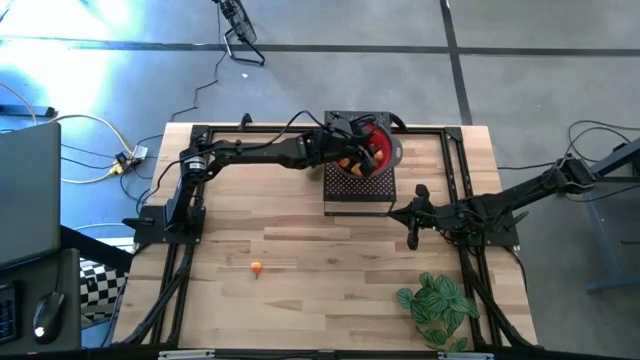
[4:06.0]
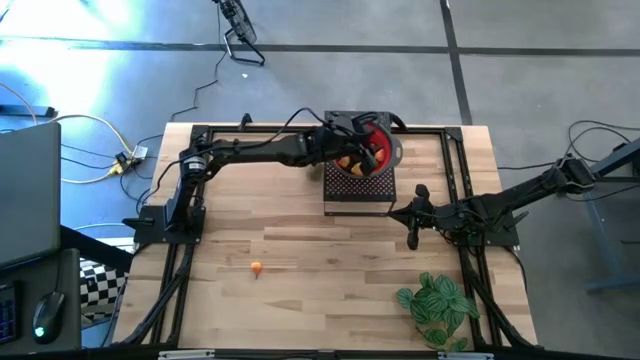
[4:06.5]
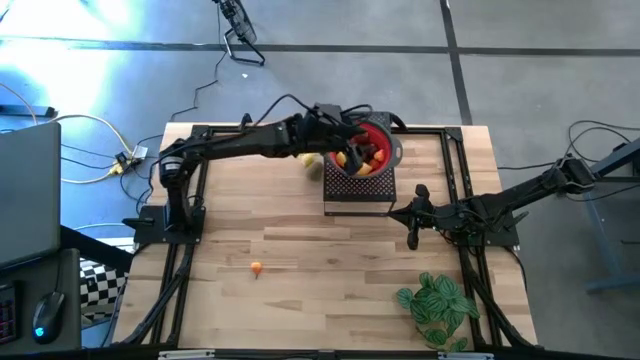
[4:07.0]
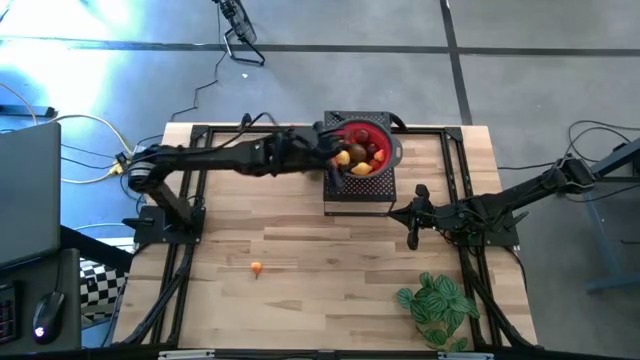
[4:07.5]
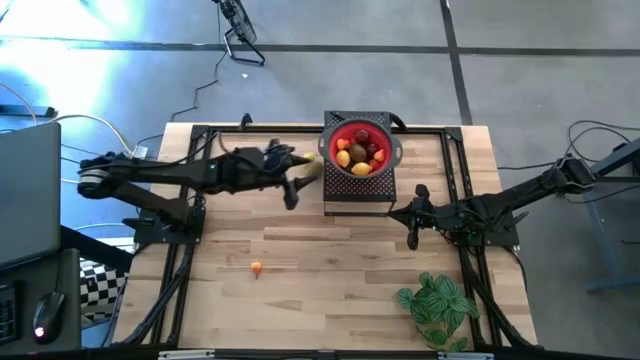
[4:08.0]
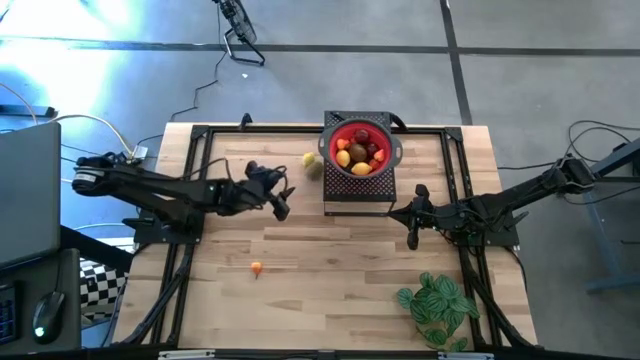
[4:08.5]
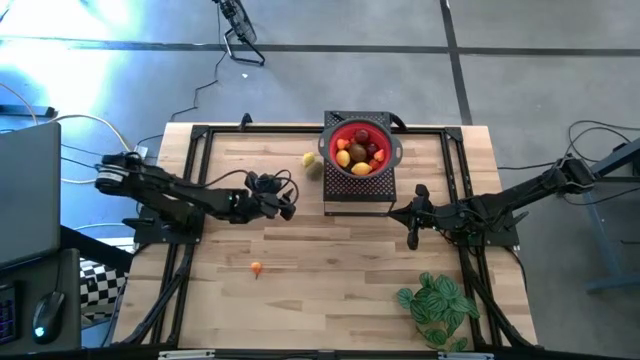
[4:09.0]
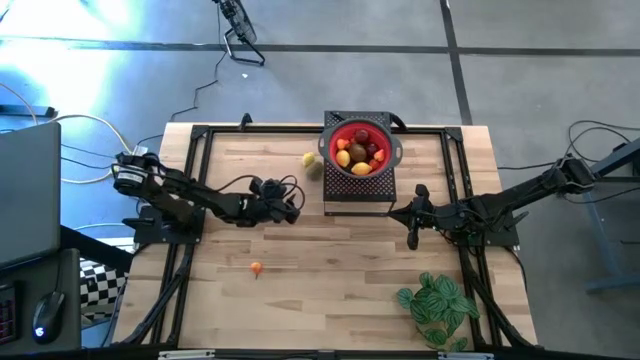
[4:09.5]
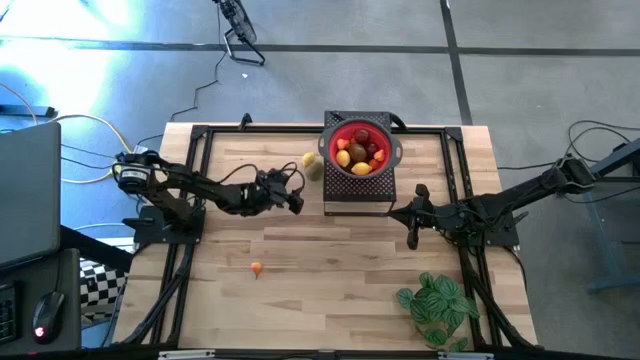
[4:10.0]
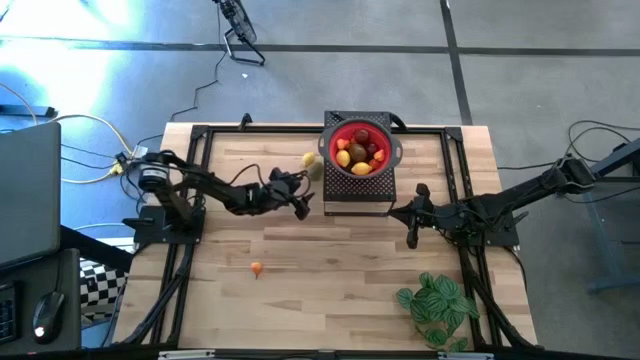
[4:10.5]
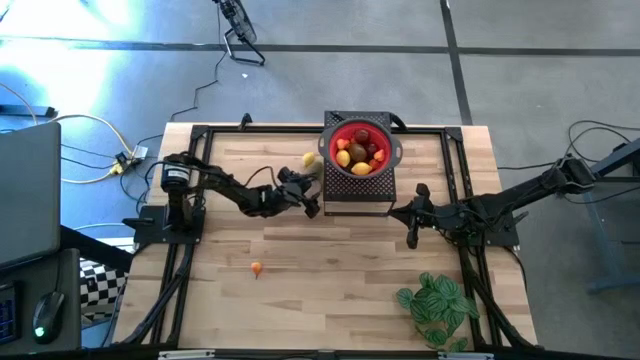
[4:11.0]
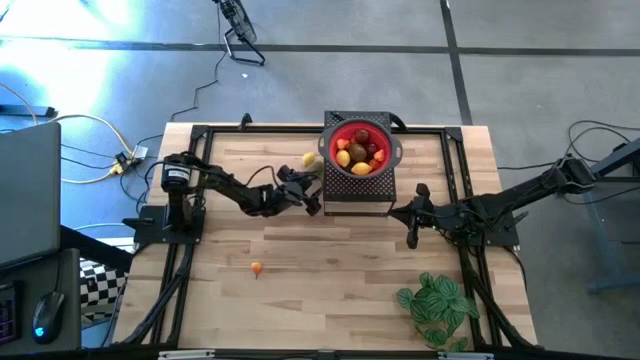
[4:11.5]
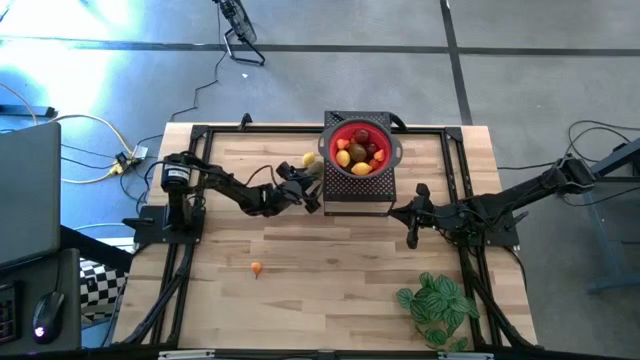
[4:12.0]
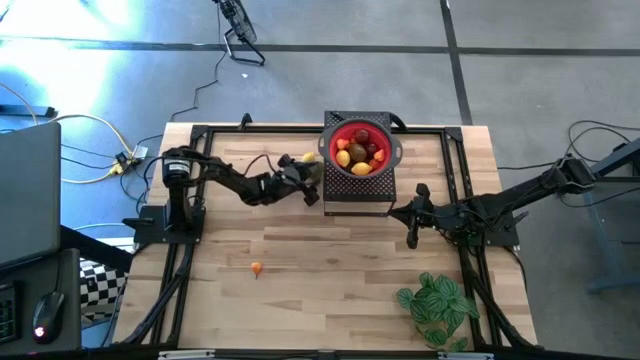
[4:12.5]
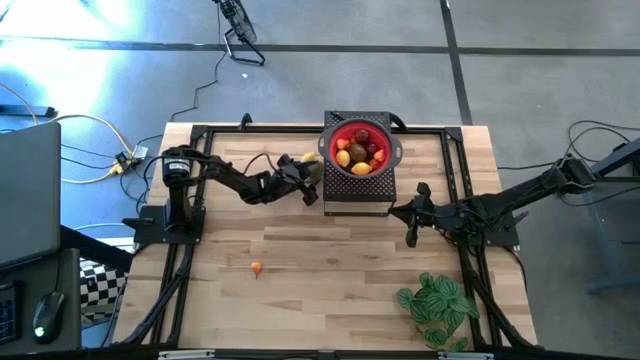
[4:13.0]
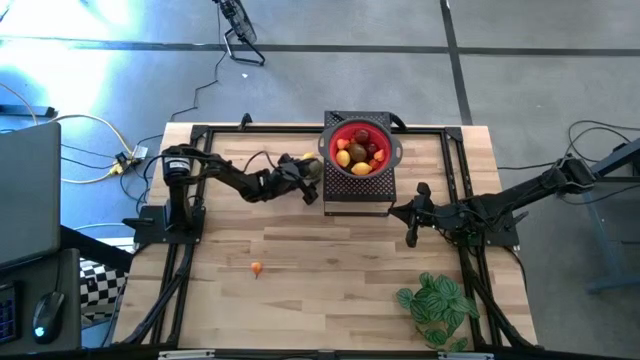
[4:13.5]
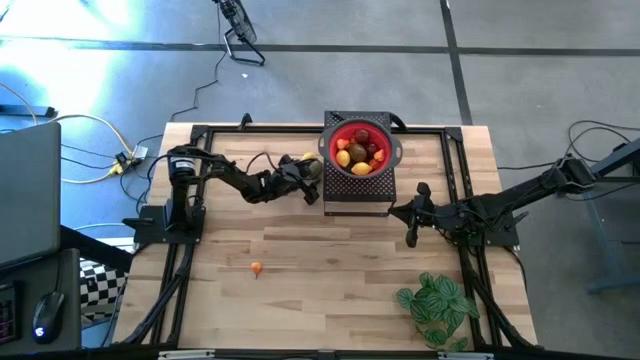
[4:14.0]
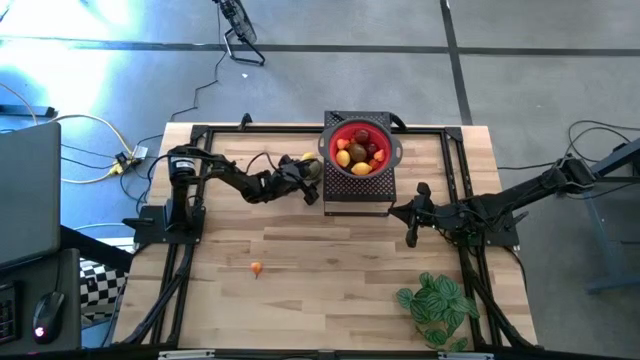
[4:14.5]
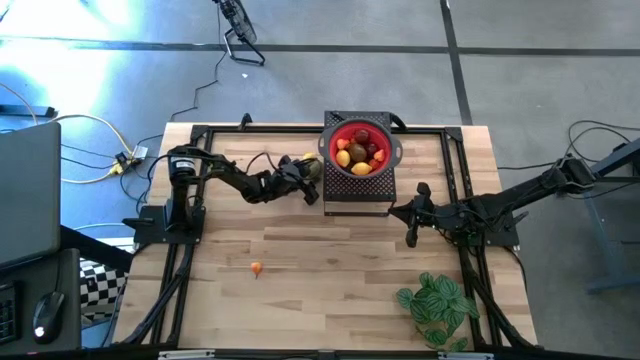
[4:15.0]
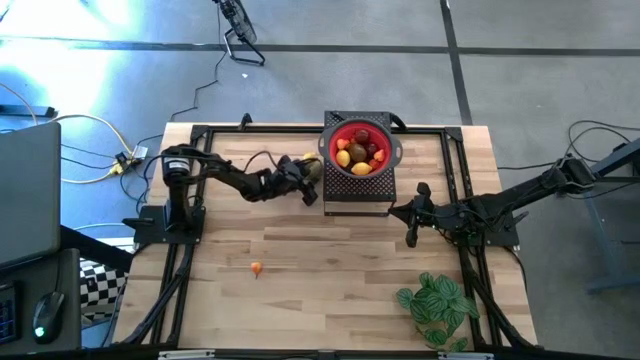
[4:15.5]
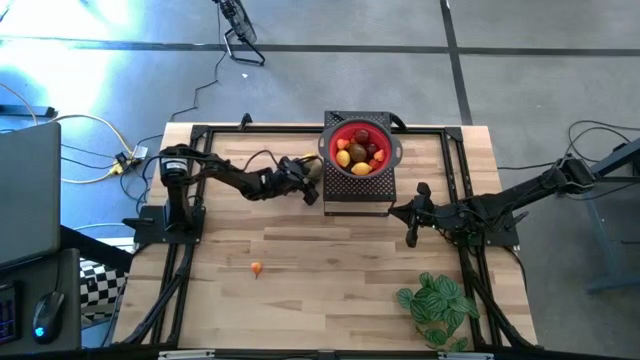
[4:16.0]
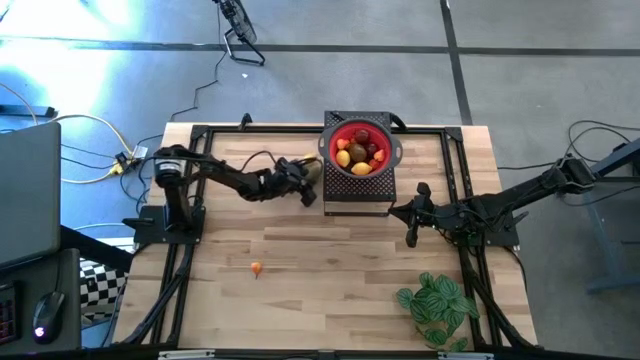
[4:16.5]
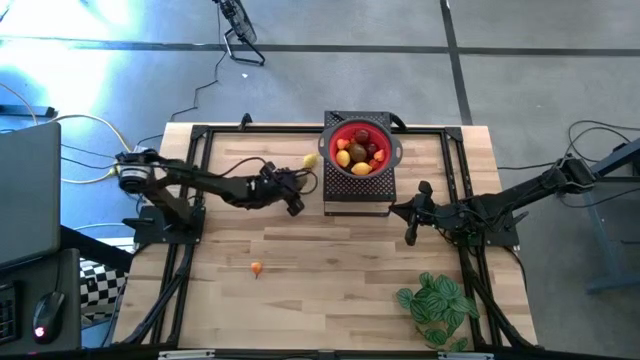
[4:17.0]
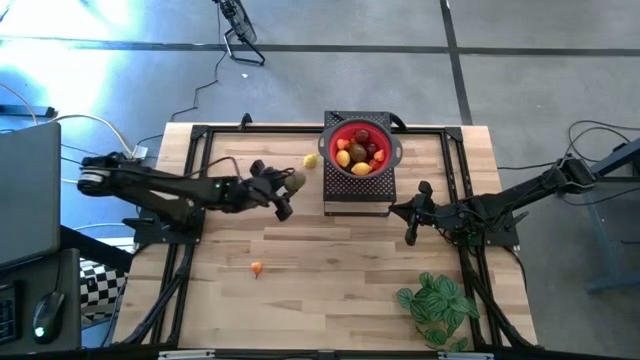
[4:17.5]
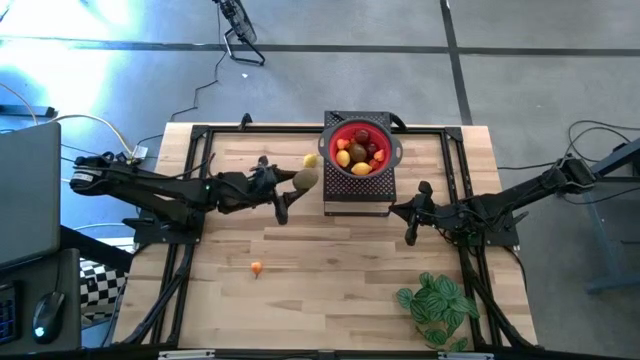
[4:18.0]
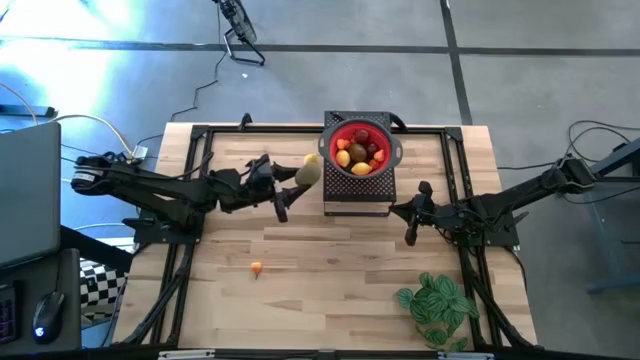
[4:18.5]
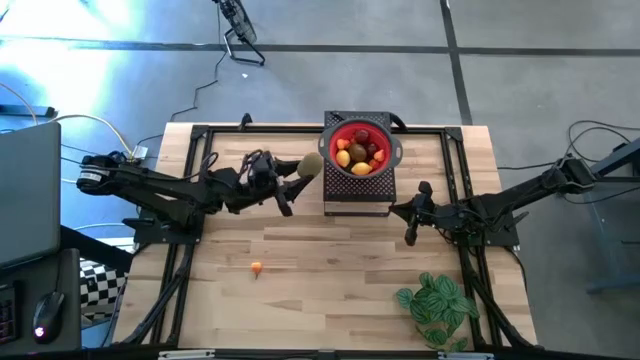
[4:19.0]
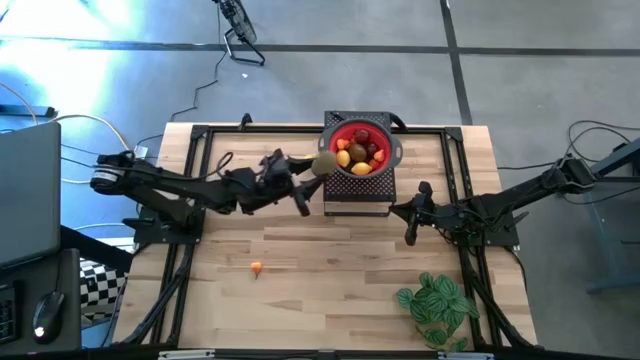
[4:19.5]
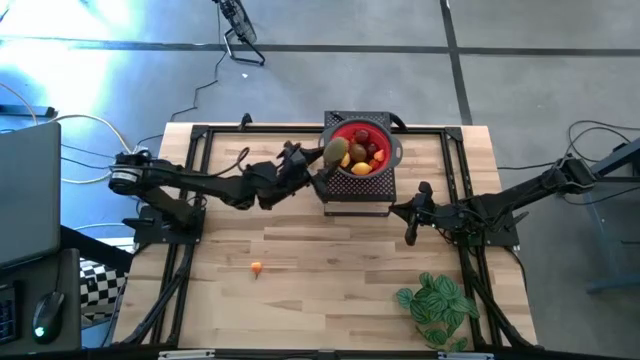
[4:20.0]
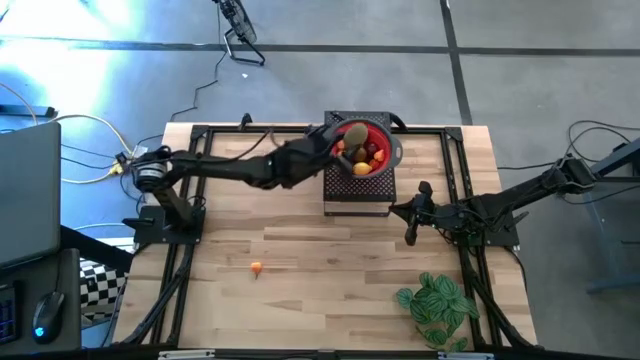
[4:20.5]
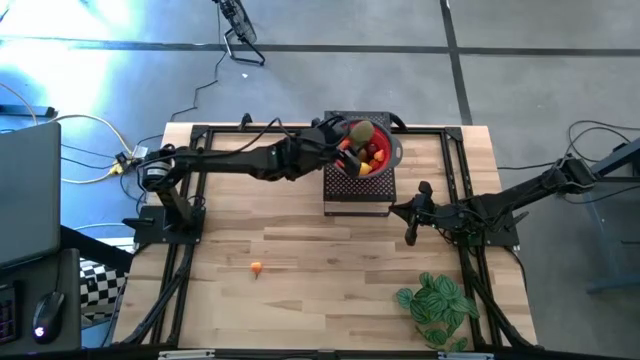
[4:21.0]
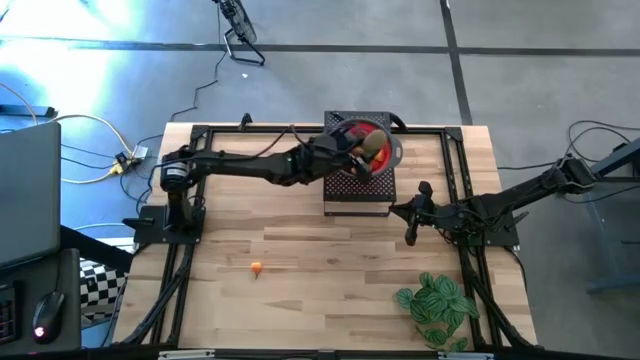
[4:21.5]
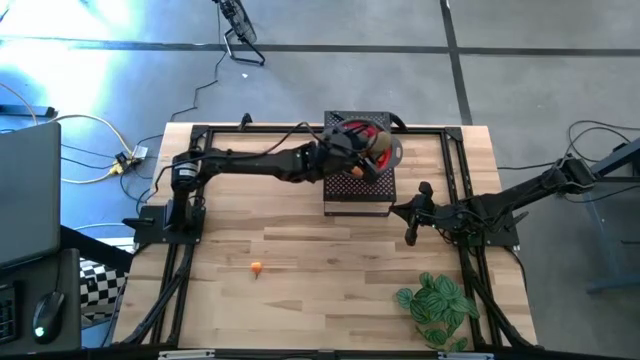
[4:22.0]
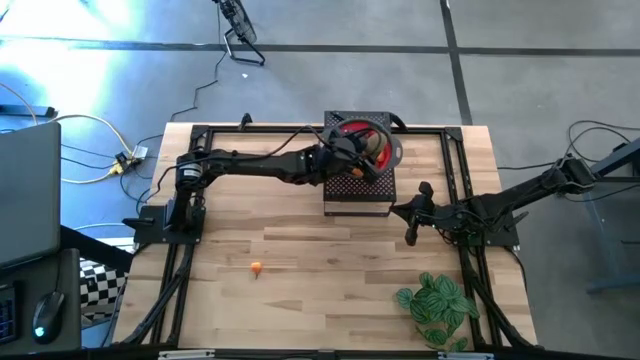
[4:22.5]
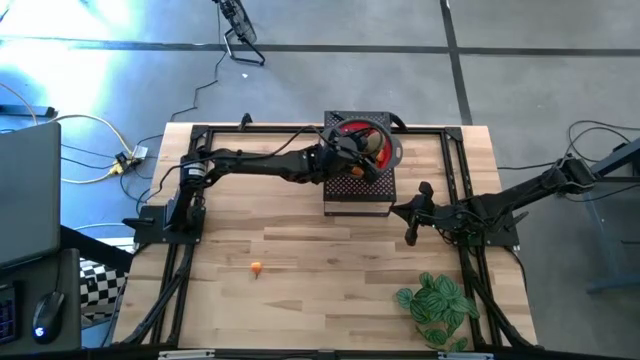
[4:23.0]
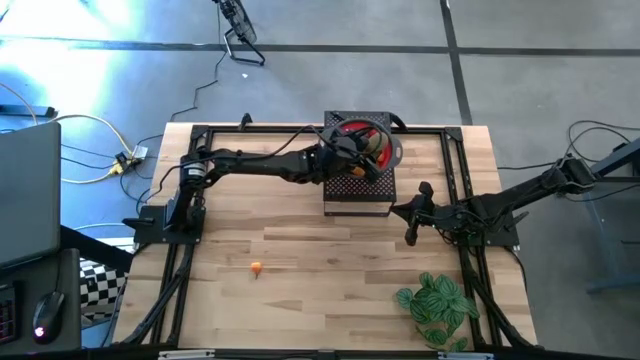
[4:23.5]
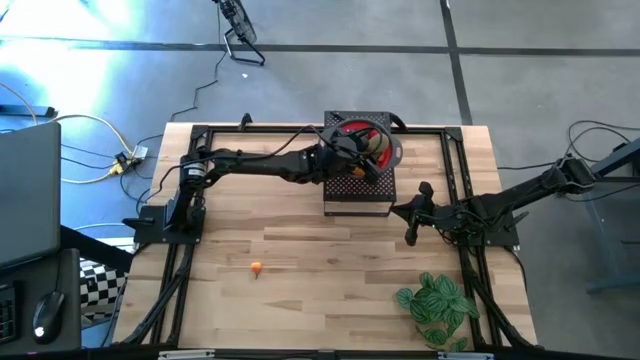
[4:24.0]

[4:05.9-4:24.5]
Task: Pick & Place Fruit
Put the brown kiwi into the red strainer bowl on the shelf

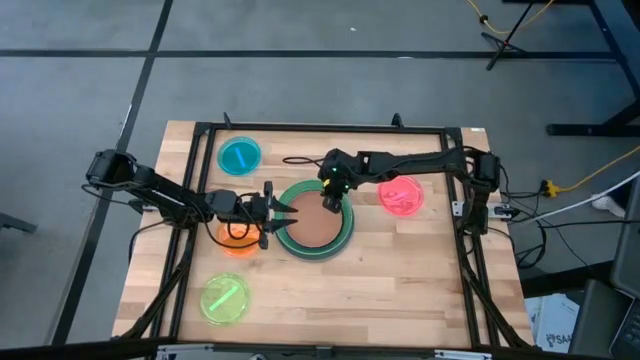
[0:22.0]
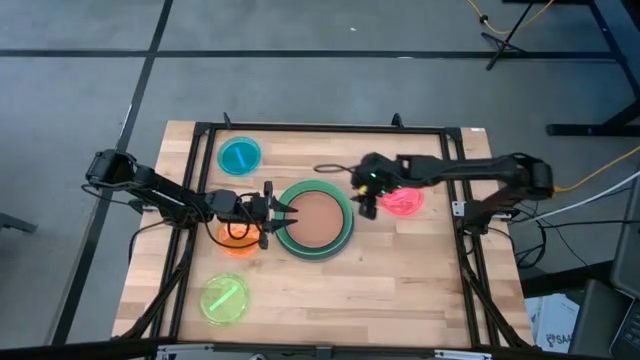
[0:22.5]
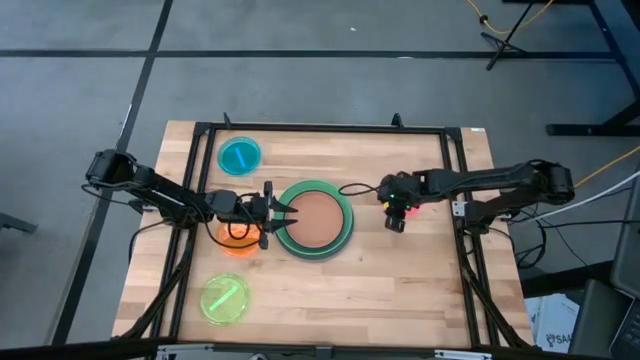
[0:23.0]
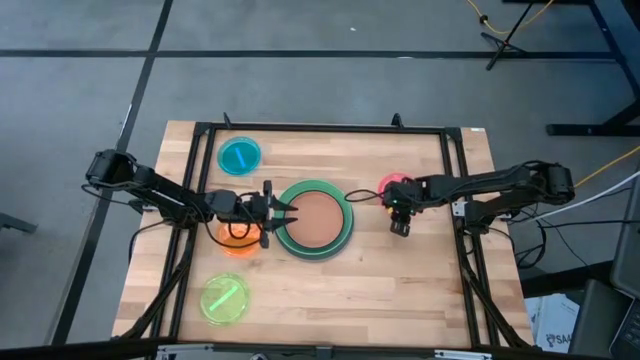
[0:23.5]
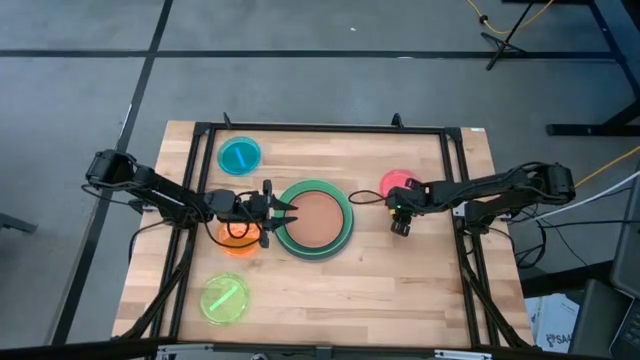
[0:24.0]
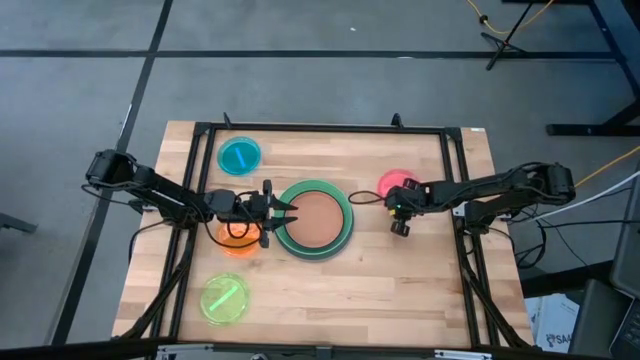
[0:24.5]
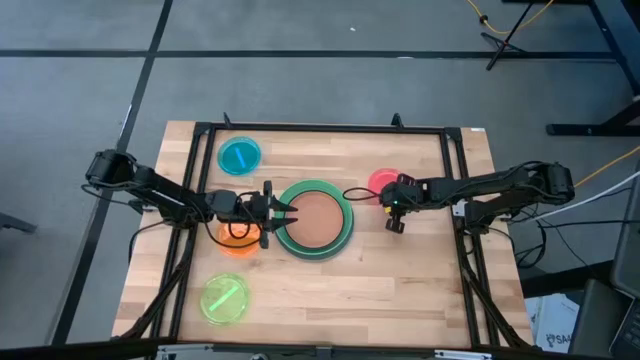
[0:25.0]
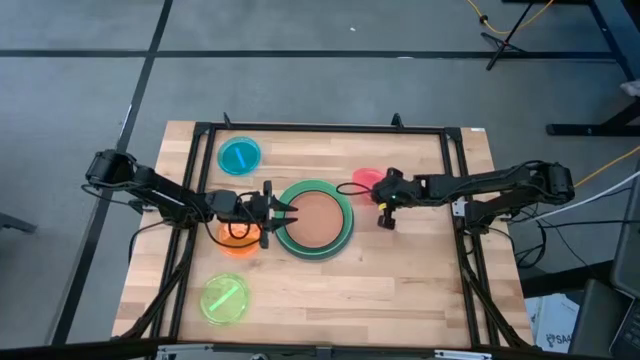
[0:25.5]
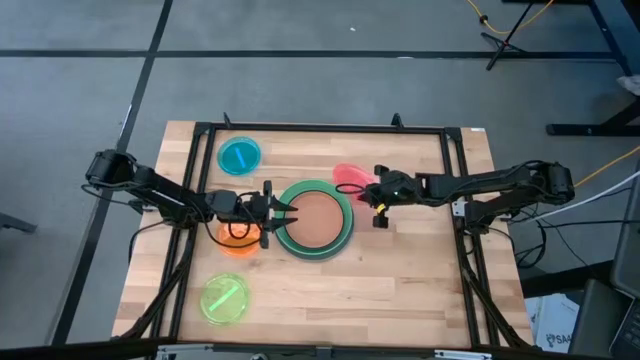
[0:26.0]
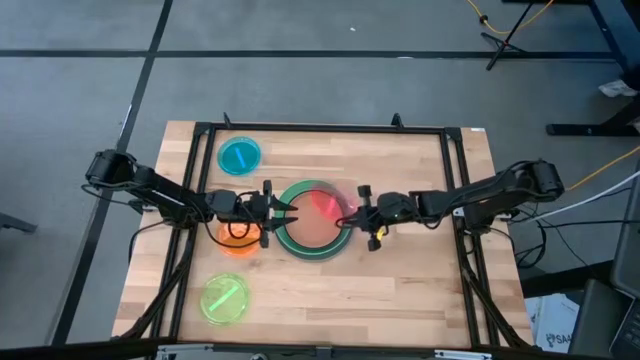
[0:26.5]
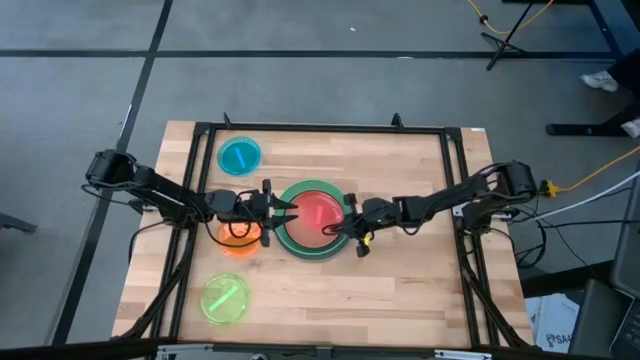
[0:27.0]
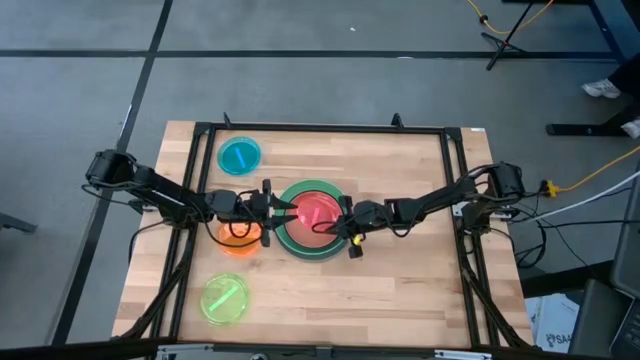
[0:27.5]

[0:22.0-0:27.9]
Task: Stack plastic plates
Stack the pink plate on top of the brown plate
